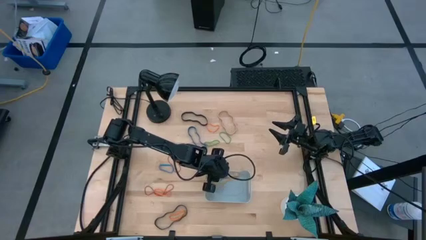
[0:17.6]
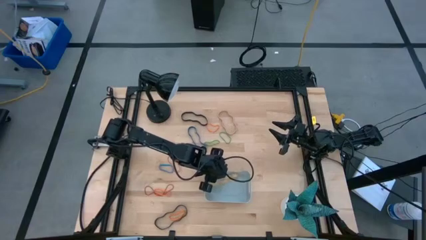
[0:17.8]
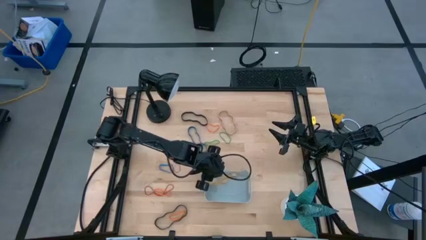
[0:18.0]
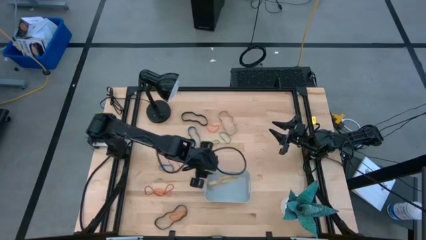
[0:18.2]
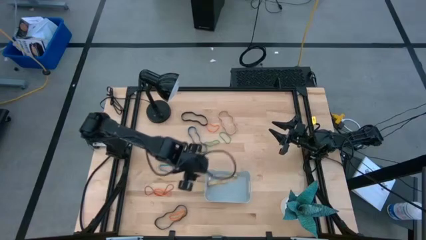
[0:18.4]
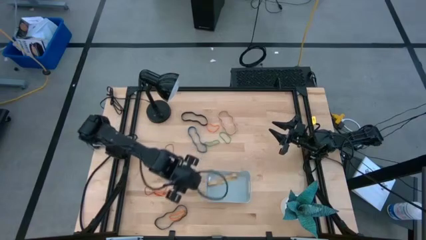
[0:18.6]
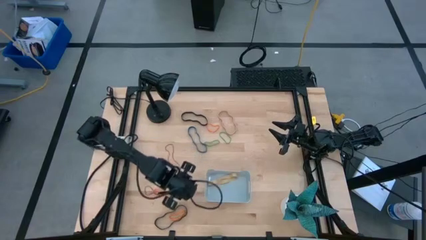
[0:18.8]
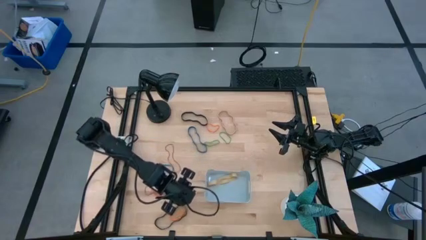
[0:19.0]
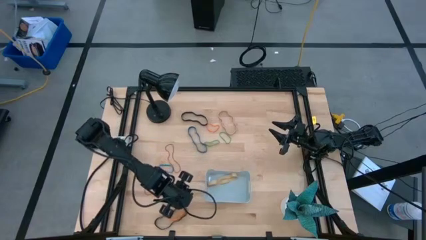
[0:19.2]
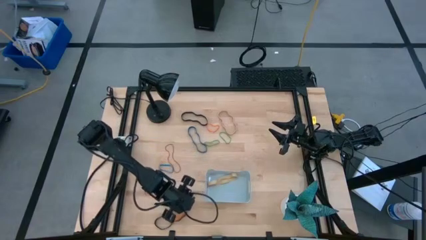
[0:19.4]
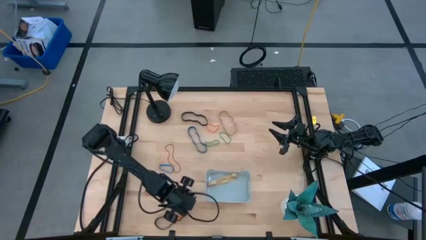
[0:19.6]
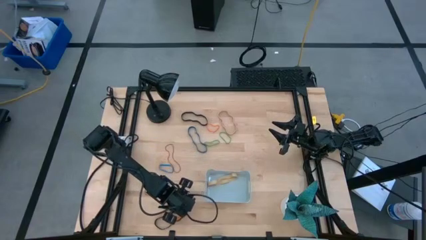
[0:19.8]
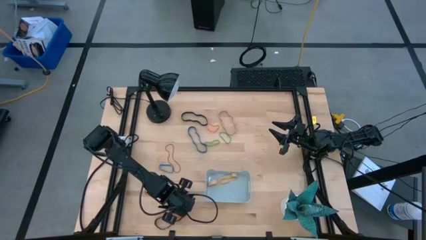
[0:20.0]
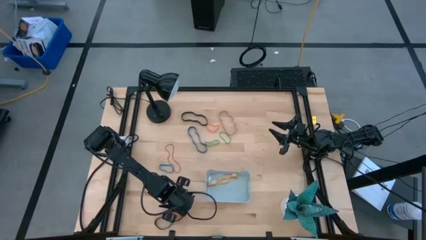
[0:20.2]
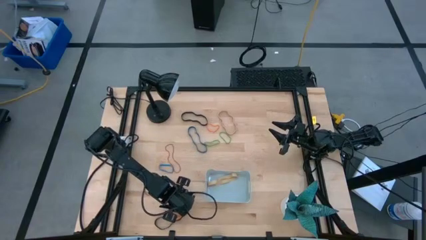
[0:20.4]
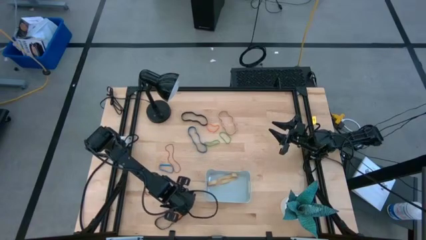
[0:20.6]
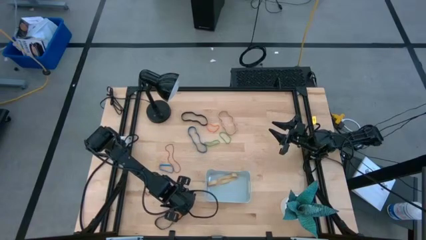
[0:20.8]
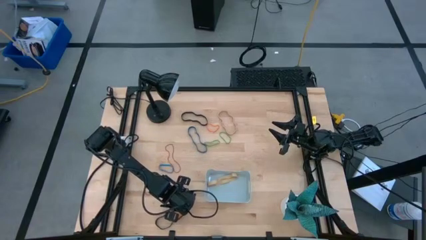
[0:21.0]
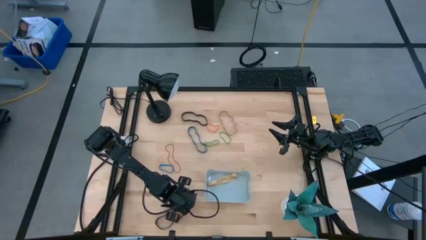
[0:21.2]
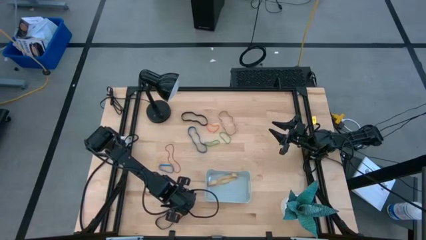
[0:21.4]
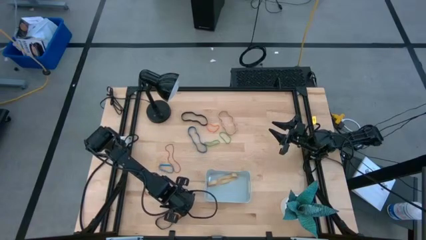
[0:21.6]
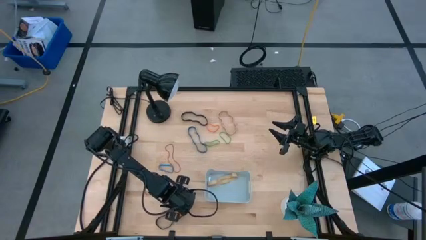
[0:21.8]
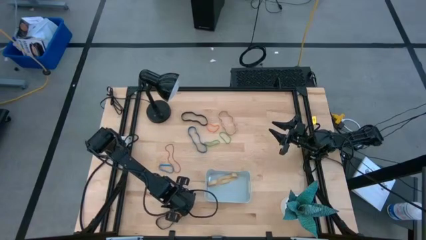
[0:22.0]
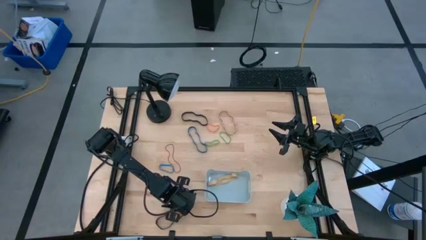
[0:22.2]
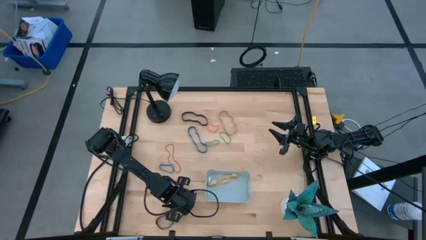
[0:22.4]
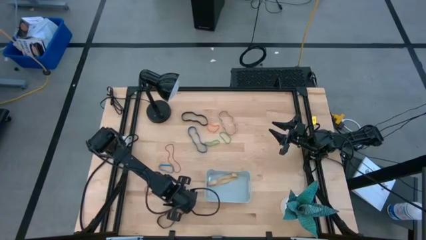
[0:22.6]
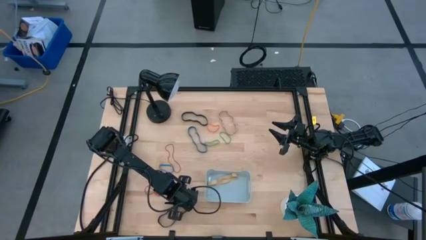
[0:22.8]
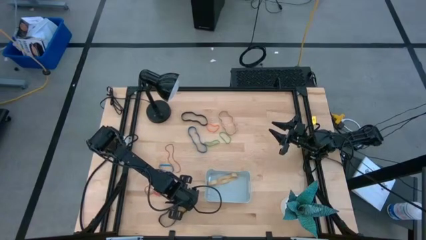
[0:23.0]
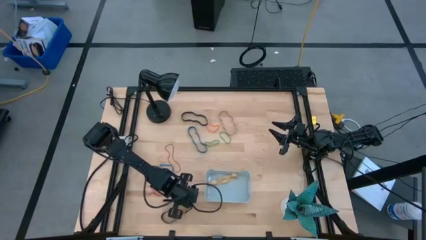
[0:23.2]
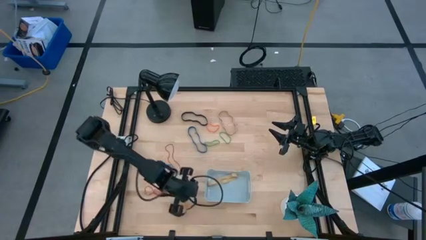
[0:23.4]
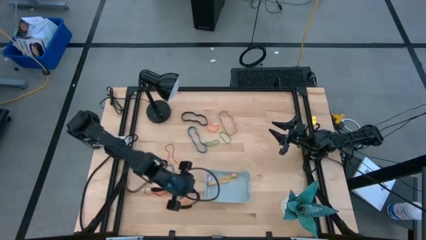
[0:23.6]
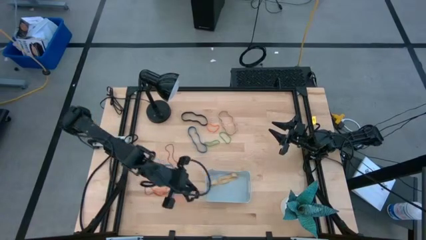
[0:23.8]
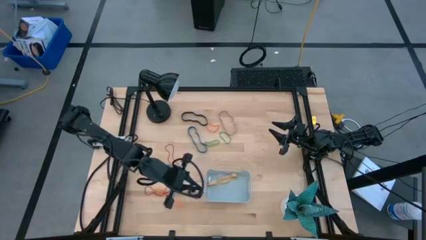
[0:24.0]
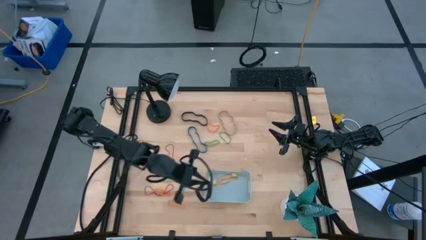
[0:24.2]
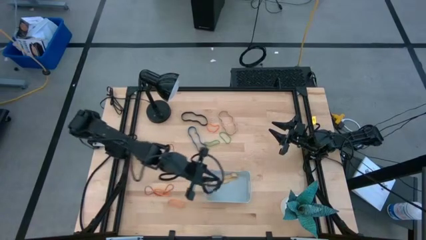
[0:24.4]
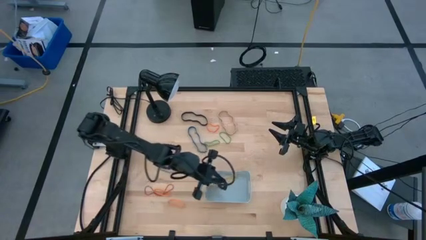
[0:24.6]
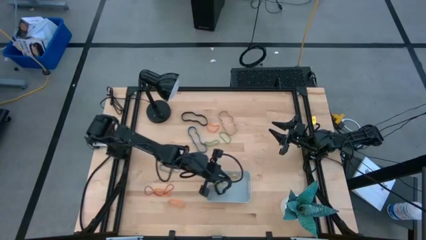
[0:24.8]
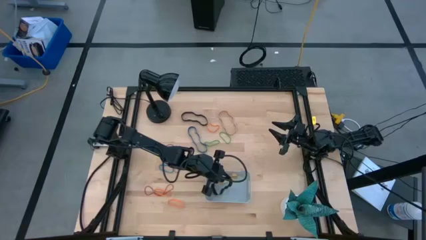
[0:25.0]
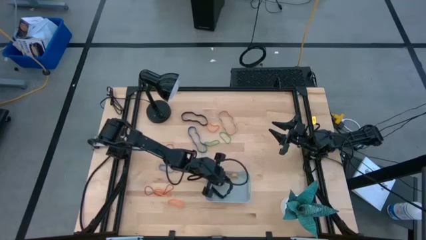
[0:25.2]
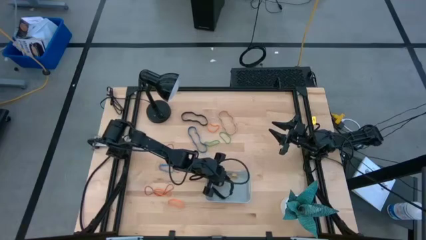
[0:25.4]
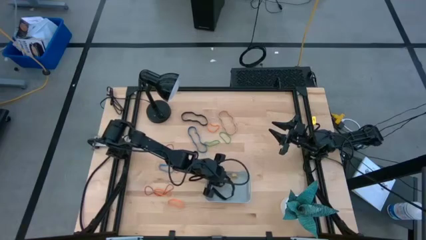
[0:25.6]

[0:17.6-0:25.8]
Task: Pick and place rubber bands into bin
Put the bottom black rubber band into the gray bin

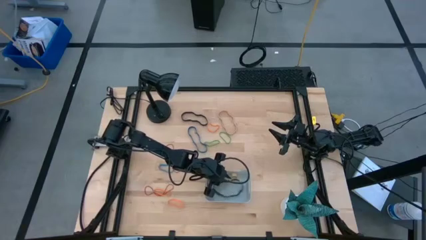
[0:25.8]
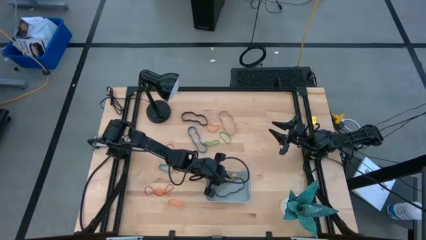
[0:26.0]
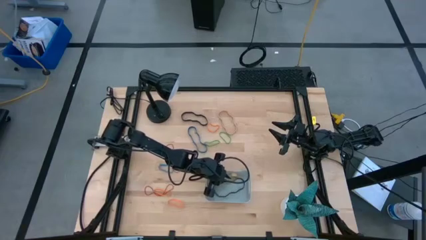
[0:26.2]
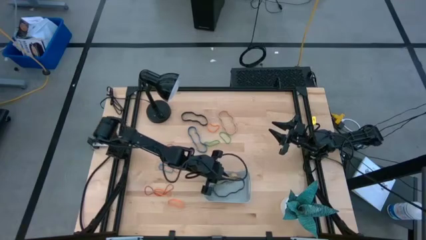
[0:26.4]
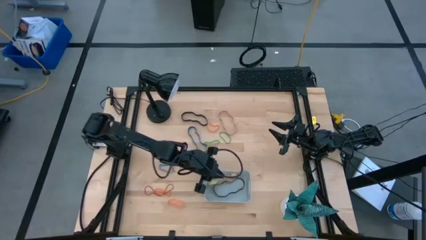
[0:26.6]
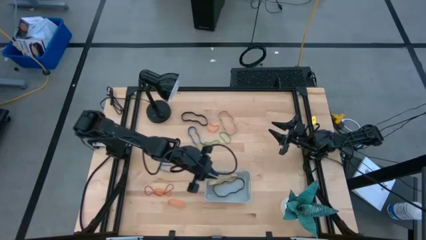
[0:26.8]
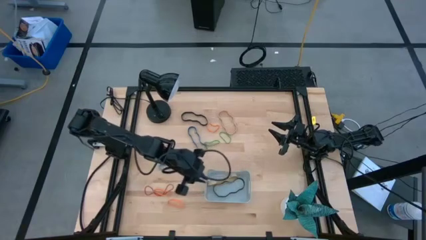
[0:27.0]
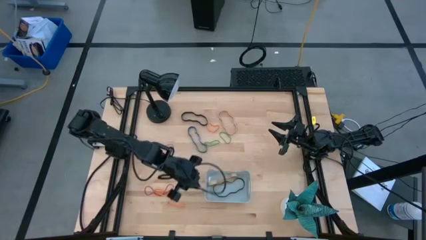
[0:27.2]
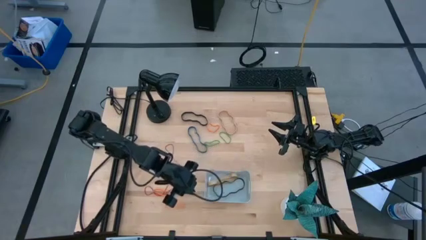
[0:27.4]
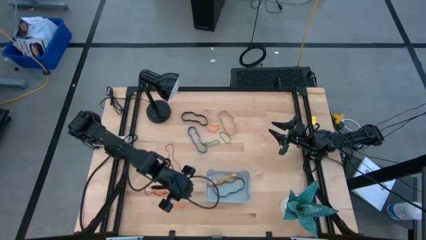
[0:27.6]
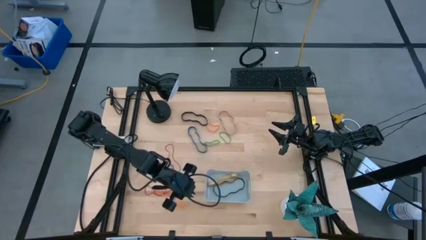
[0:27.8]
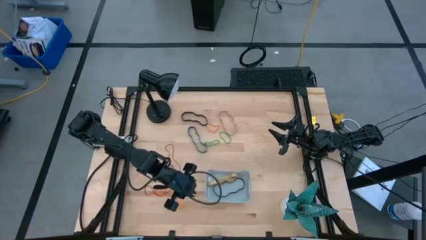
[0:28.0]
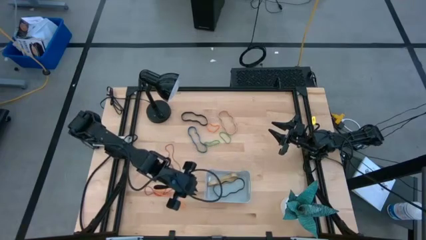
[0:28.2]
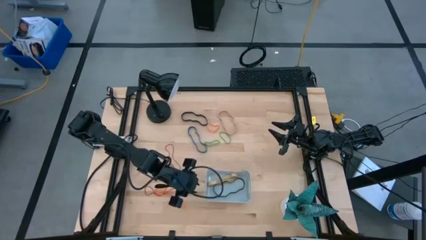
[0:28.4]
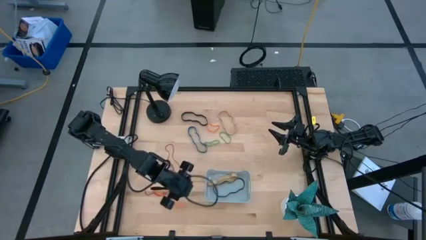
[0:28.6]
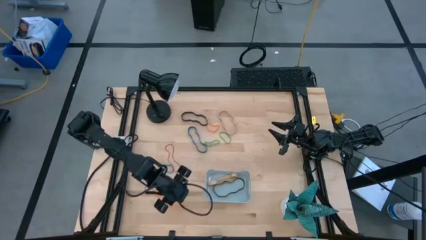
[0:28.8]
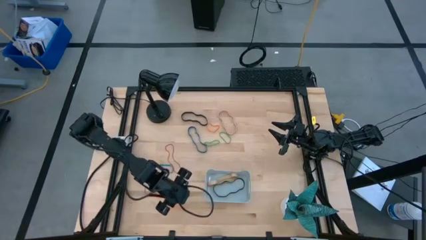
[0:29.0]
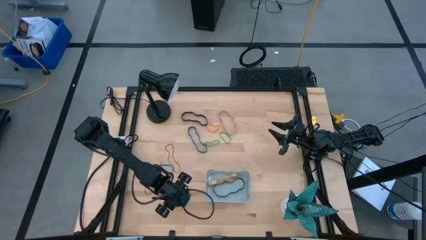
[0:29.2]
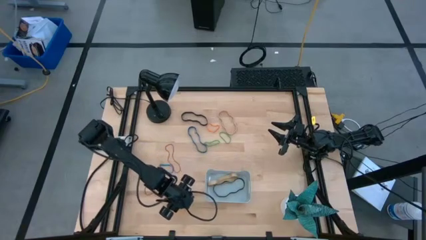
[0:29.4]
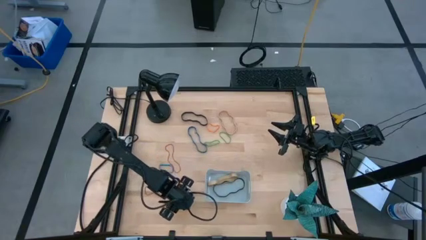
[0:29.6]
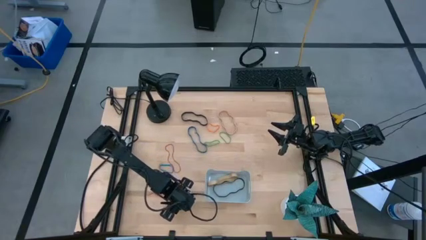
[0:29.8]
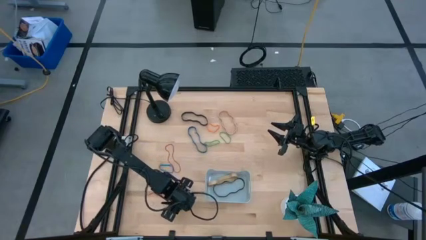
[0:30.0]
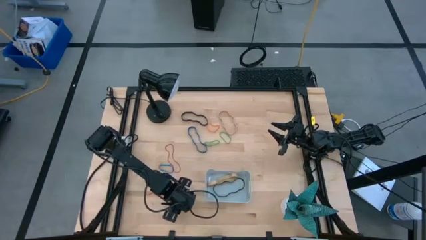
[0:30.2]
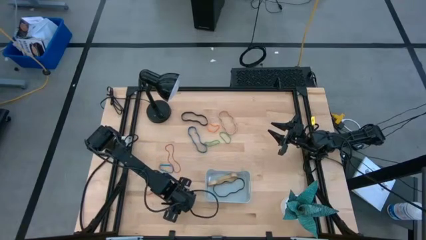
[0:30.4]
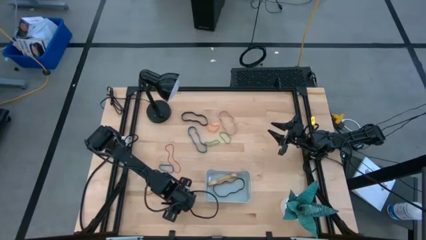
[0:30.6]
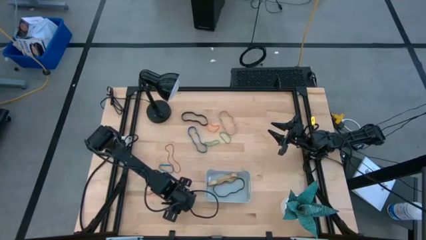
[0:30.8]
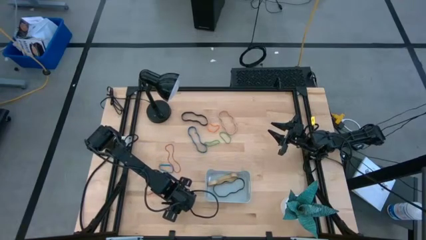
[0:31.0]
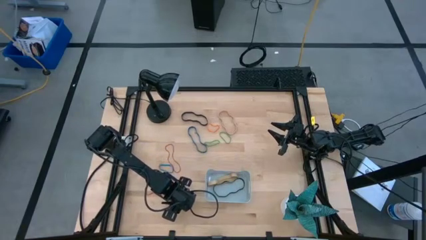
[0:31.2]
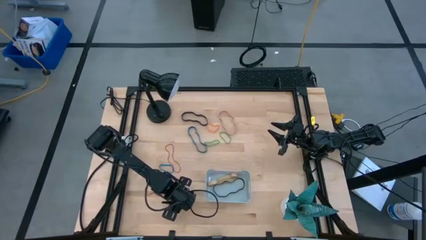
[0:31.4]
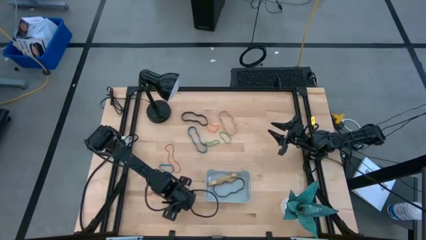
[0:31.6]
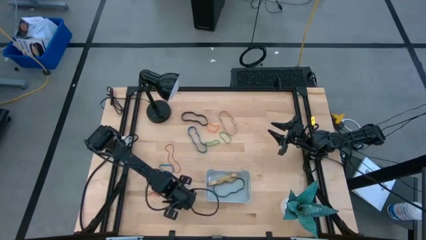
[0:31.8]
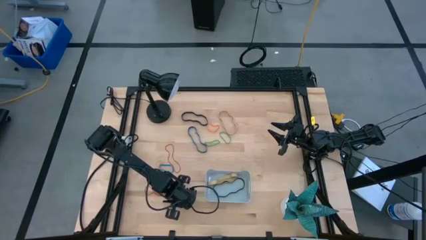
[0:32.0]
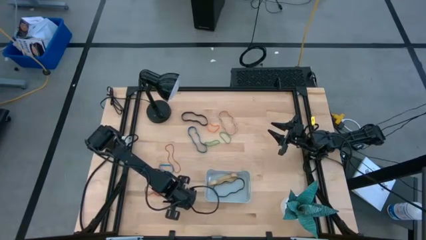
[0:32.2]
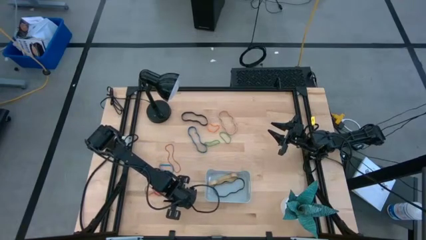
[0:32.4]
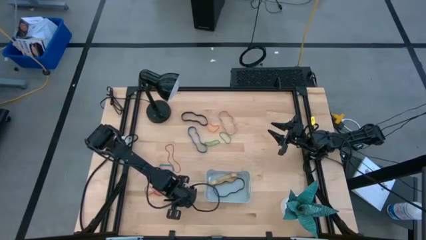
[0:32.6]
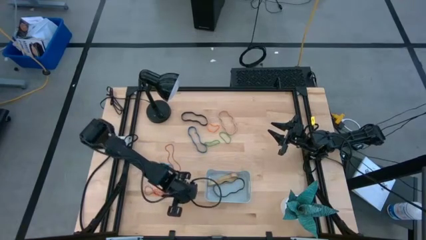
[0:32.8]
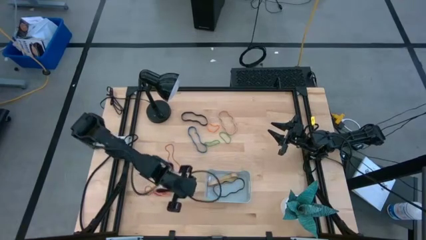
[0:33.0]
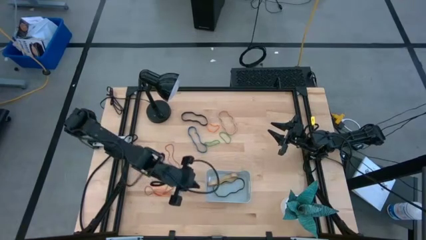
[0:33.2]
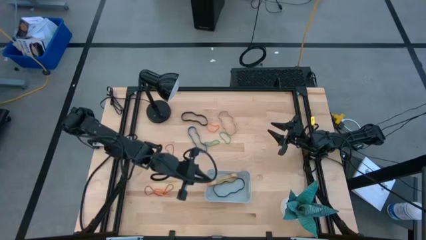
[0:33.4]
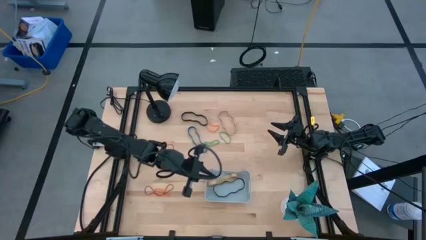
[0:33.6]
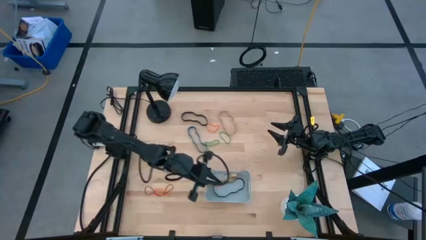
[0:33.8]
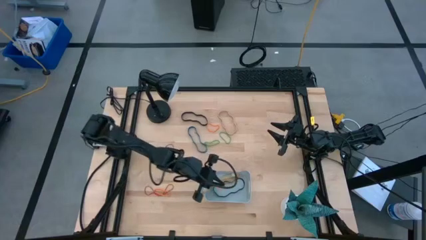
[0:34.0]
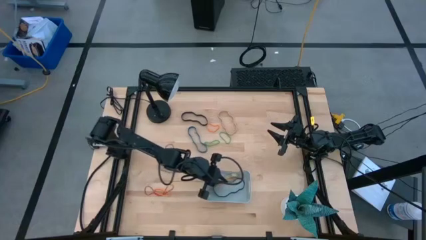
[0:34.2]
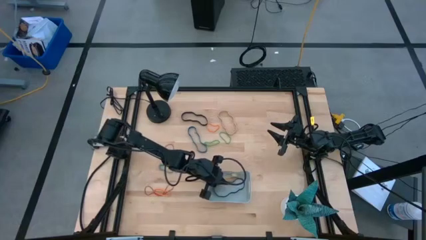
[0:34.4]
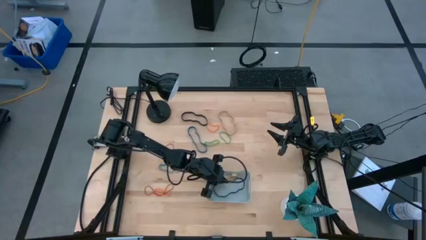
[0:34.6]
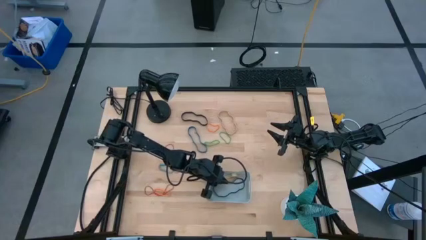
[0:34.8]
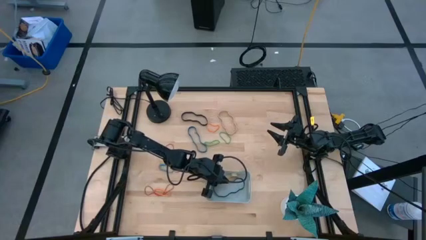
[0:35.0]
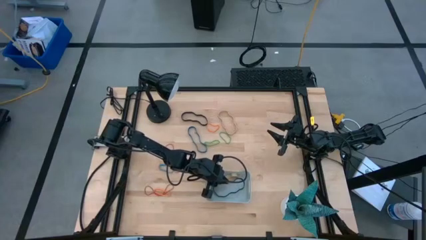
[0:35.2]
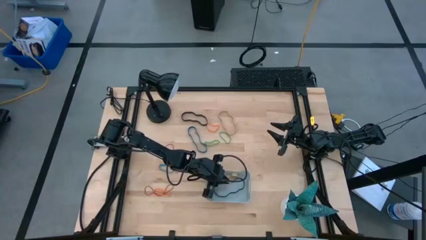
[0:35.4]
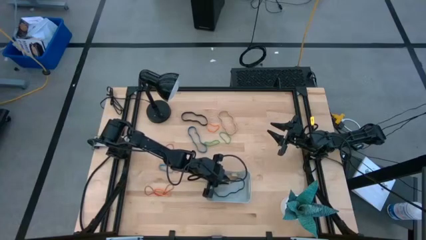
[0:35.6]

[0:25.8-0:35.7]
Put the bottom orange rubber band into the gray bin
